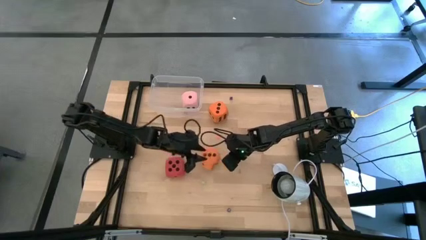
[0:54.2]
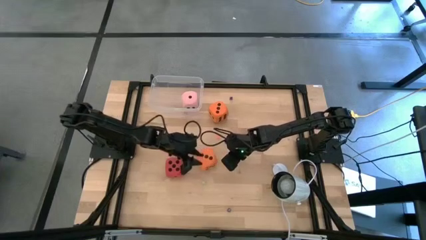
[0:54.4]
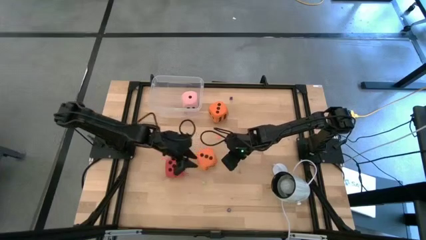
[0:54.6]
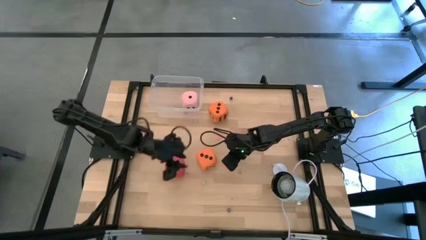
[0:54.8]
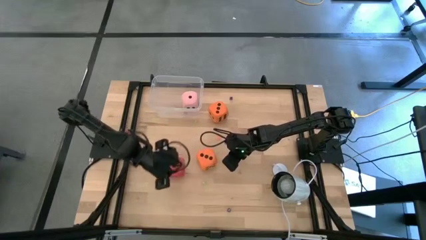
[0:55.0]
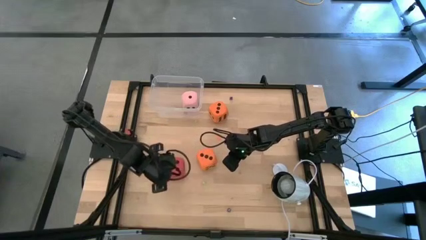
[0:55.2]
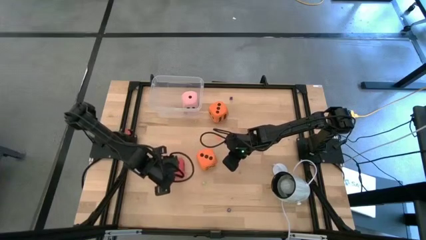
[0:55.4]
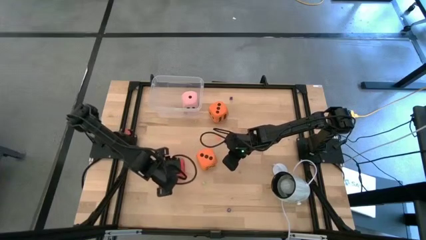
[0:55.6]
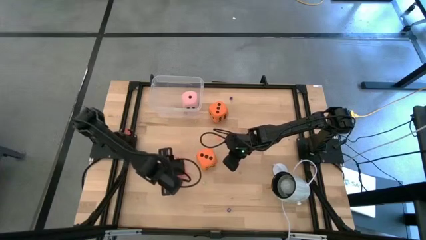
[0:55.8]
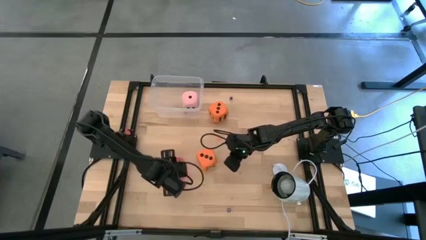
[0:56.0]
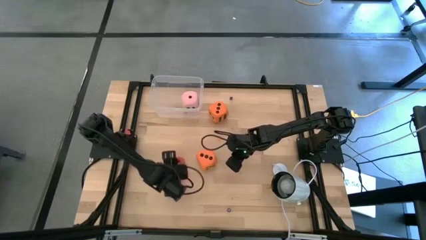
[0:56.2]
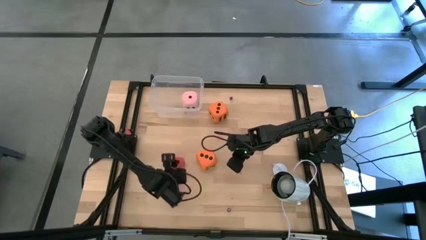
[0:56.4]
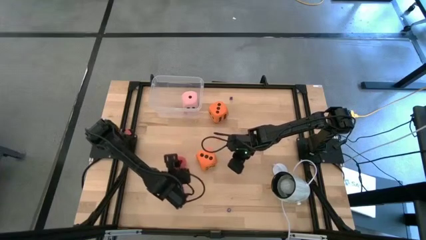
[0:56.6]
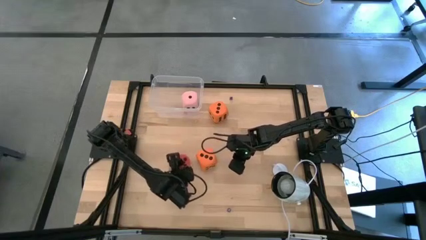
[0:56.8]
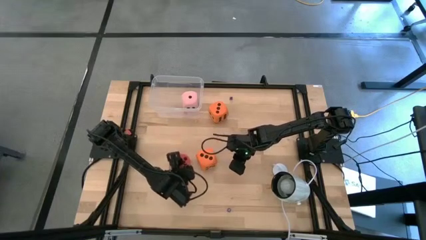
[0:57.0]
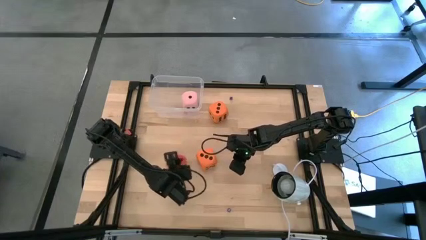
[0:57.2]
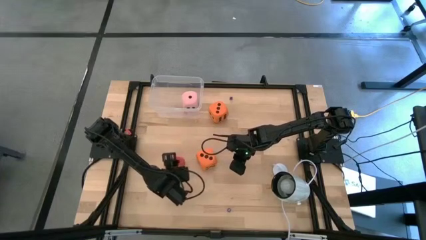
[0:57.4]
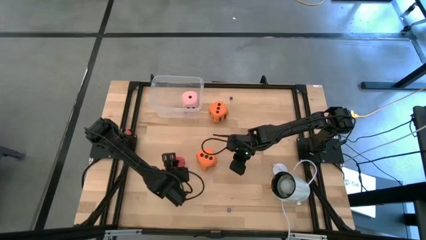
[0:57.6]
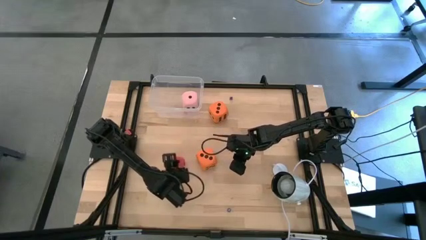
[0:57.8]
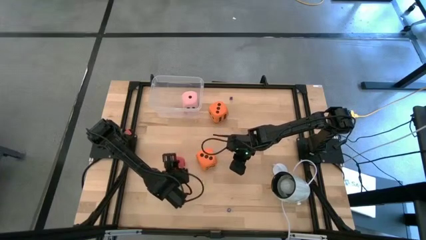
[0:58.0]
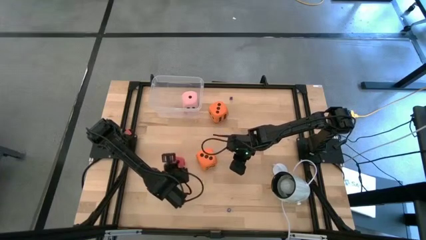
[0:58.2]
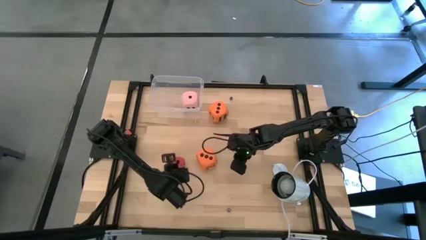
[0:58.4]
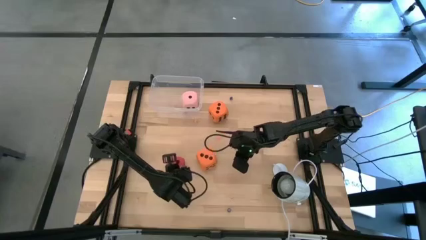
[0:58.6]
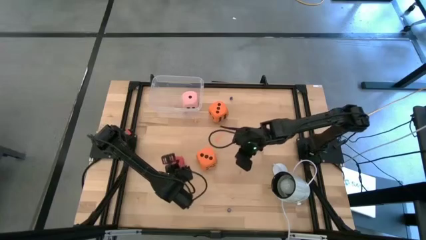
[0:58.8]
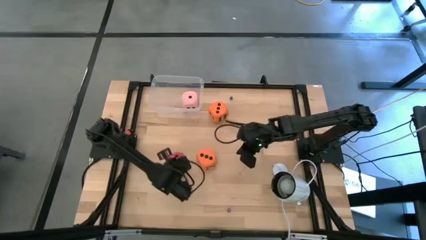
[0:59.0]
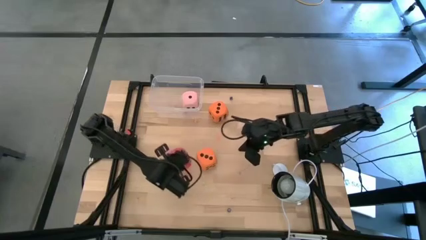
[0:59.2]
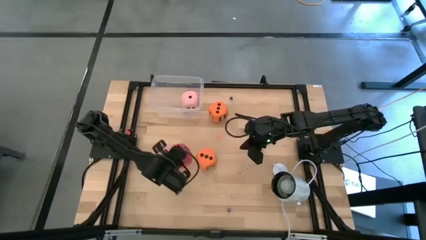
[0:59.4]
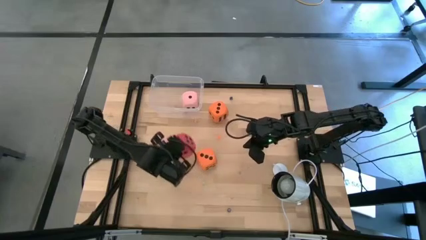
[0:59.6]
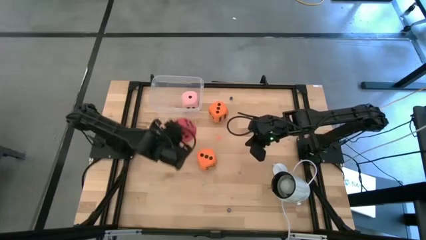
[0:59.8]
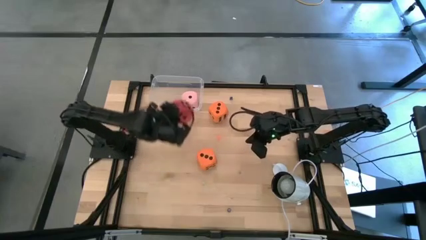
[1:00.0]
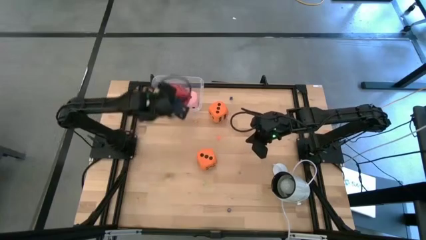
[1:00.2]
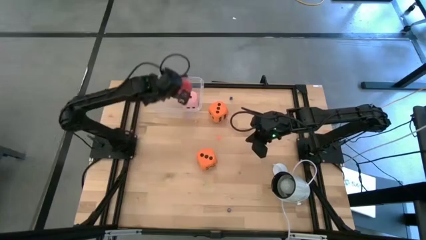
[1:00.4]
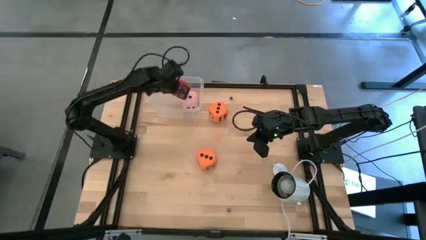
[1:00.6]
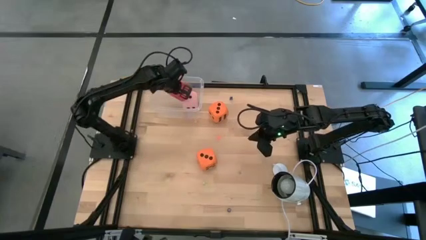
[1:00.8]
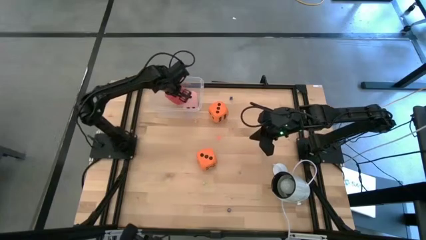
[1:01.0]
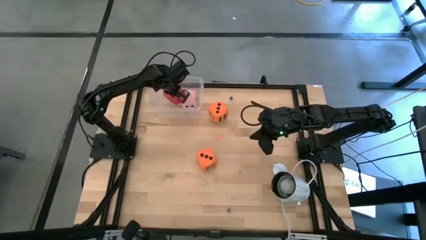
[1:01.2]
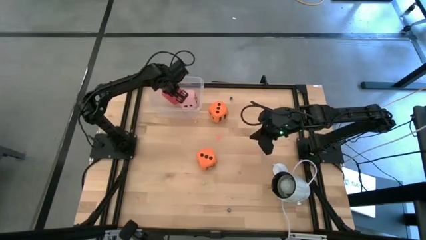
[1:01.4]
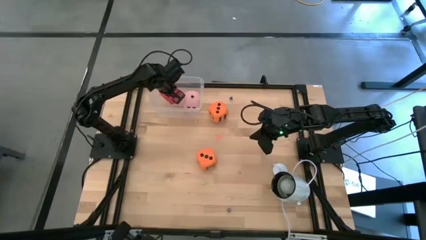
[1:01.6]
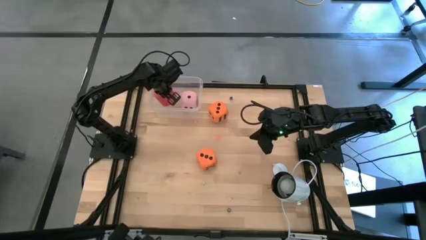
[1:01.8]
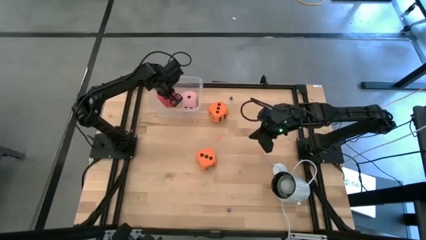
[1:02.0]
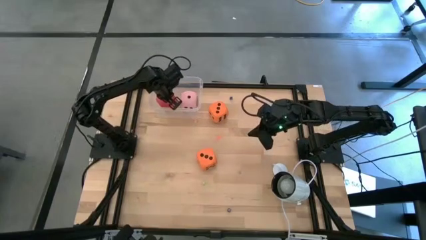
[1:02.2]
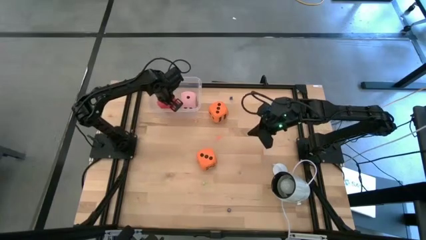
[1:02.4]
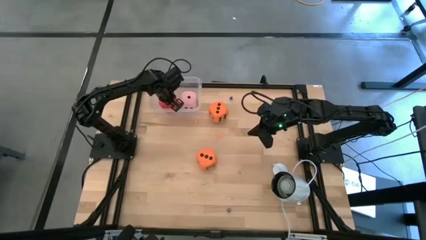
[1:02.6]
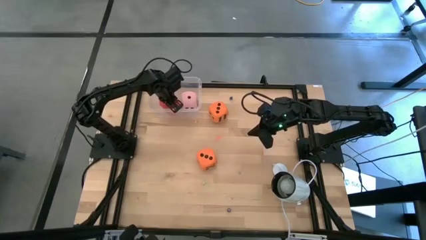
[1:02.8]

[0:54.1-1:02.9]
Task: Pick & Place Dice
Put the large red die into the transparent bin

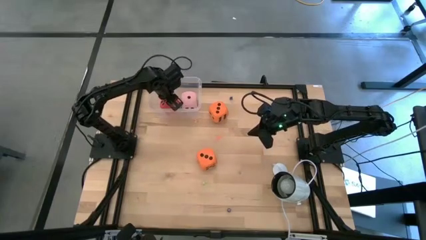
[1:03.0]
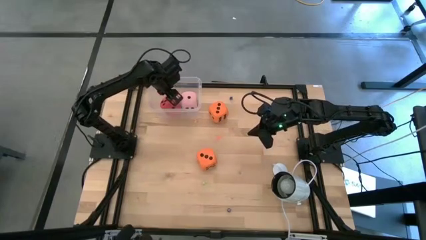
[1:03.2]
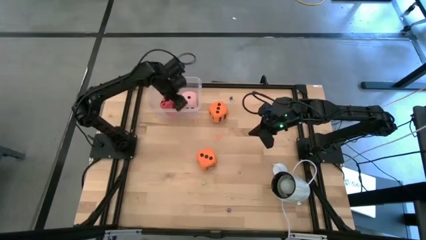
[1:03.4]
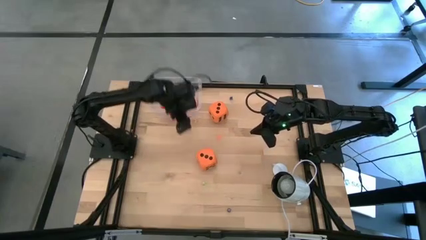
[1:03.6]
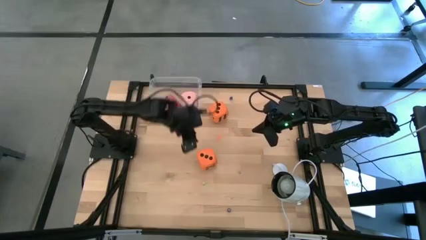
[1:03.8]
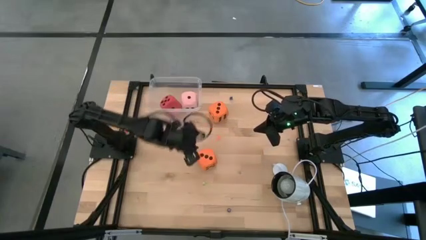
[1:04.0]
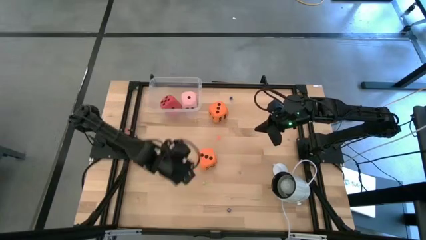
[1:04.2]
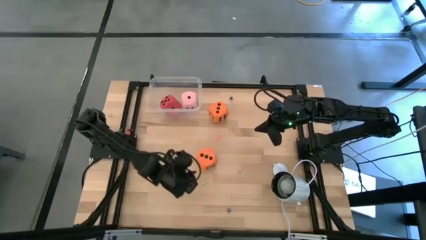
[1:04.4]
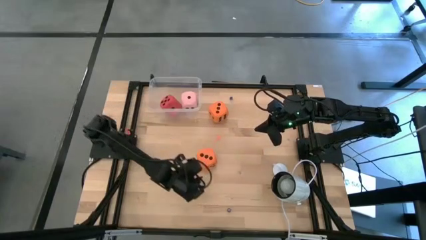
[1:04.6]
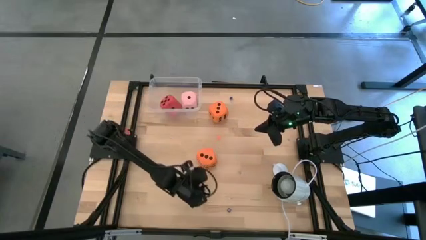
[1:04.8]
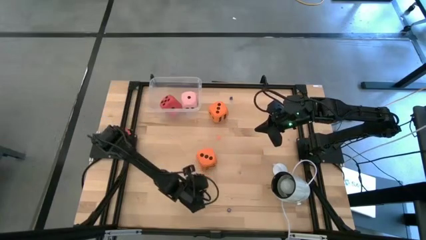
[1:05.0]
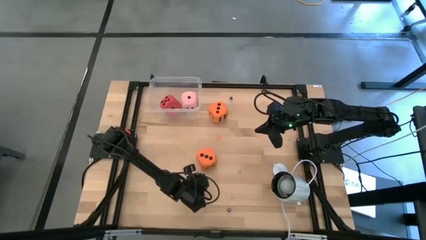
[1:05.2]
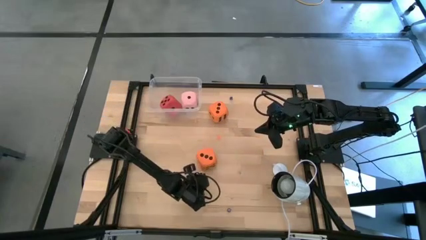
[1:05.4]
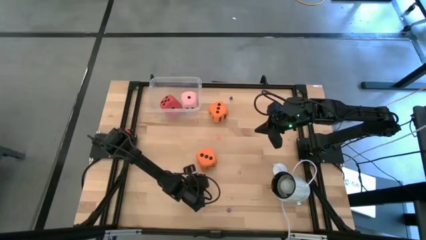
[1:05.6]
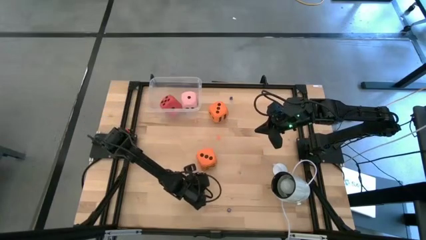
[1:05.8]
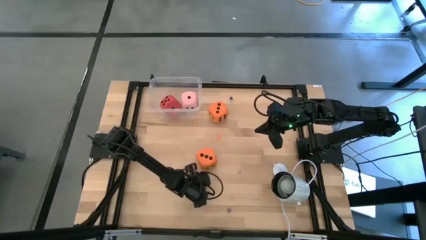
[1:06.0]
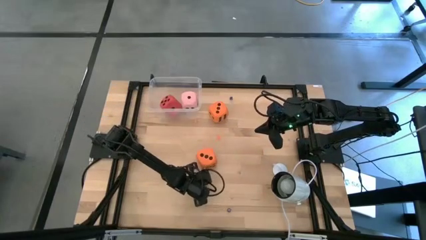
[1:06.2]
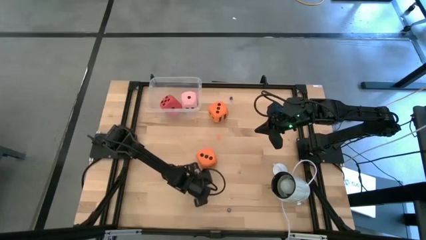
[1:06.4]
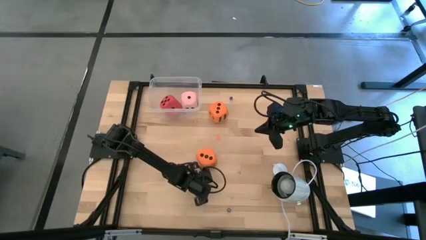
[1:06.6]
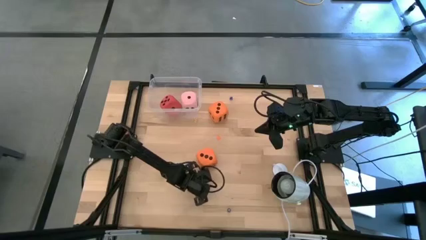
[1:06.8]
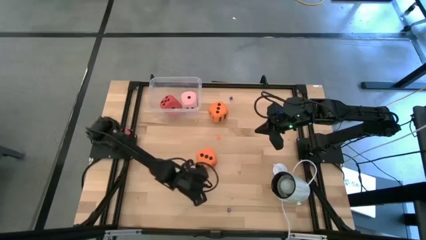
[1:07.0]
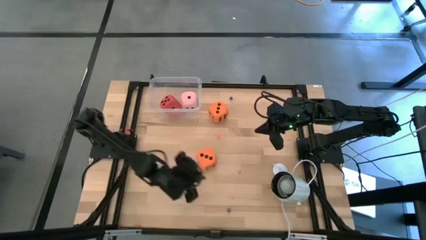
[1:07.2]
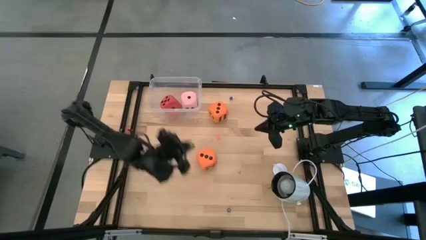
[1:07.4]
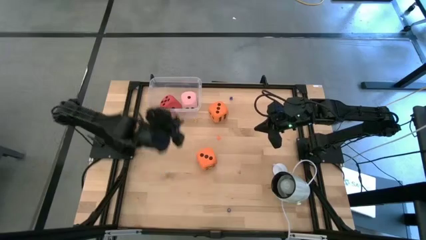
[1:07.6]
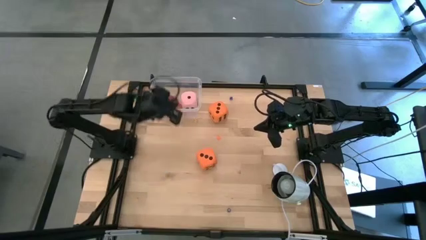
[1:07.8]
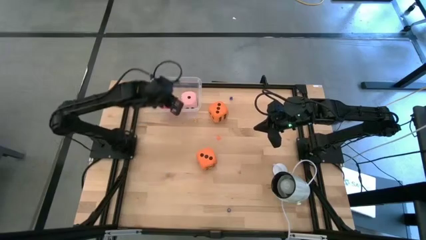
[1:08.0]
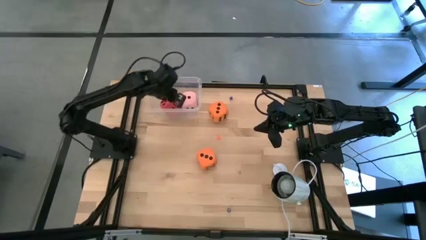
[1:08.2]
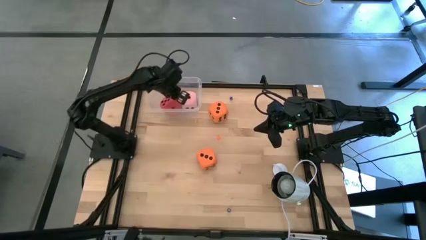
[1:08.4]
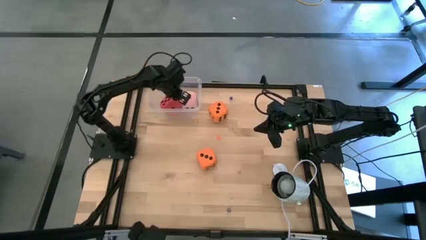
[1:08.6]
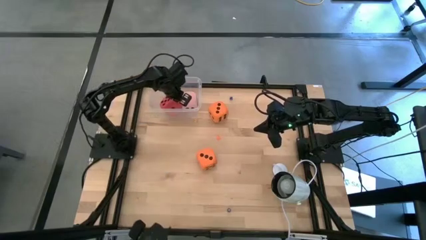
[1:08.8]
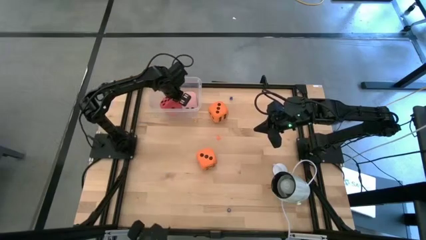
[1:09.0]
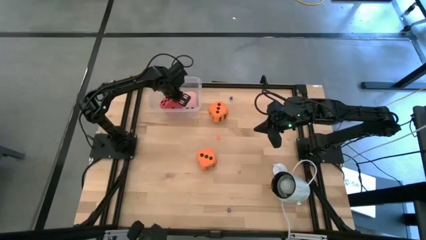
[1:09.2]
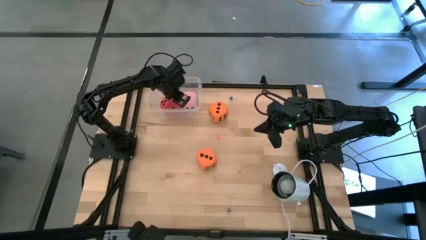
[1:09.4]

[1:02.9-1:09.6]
Put the small green die into the transparent bin
